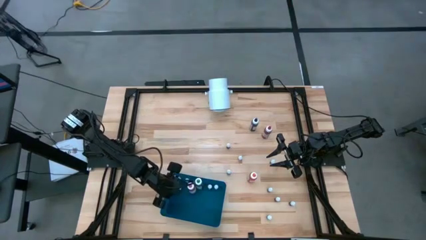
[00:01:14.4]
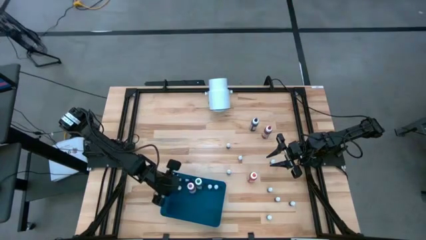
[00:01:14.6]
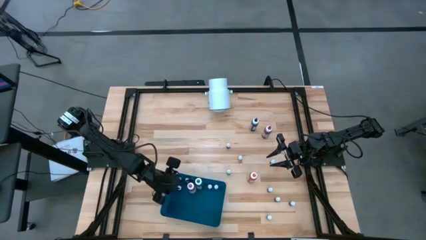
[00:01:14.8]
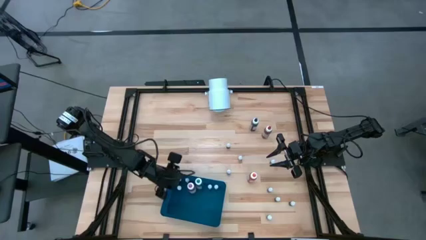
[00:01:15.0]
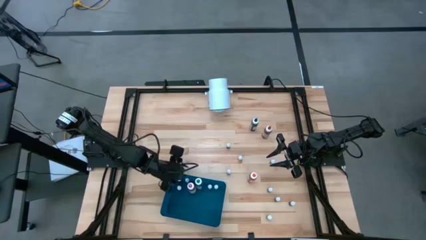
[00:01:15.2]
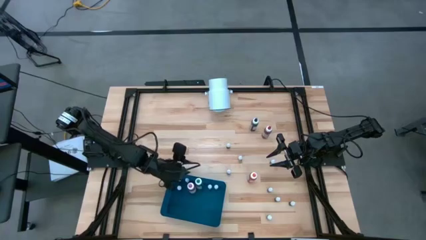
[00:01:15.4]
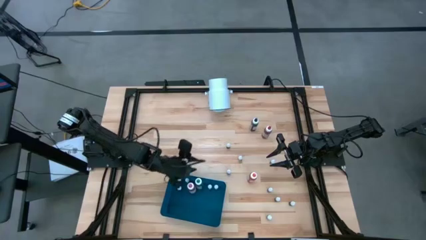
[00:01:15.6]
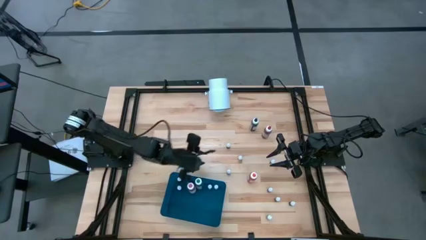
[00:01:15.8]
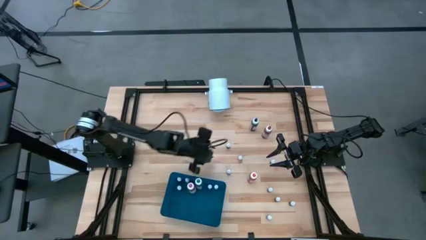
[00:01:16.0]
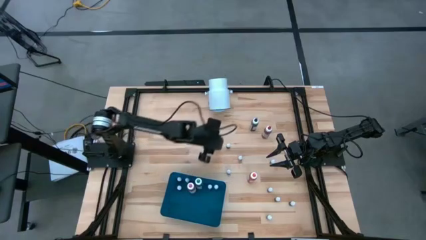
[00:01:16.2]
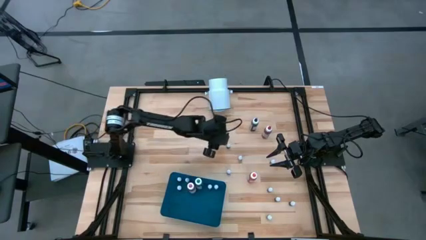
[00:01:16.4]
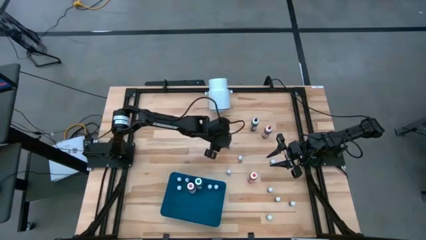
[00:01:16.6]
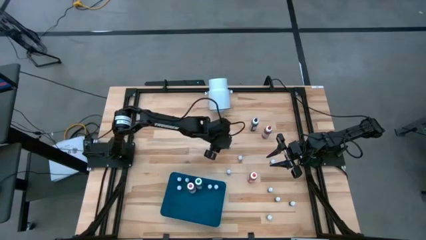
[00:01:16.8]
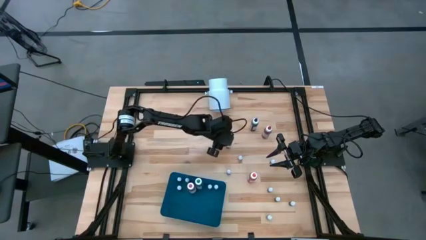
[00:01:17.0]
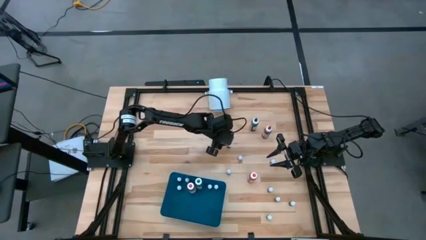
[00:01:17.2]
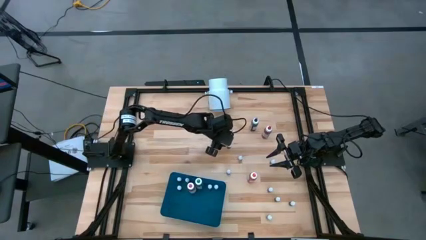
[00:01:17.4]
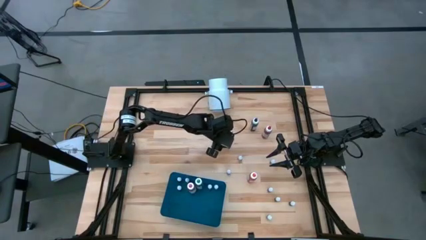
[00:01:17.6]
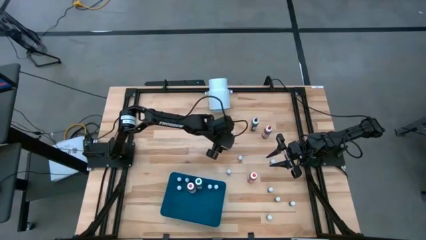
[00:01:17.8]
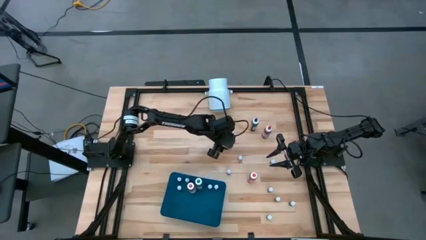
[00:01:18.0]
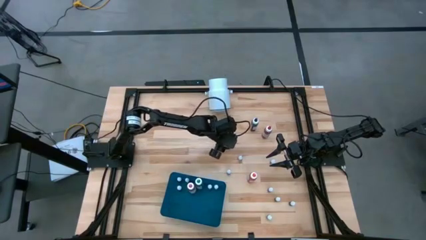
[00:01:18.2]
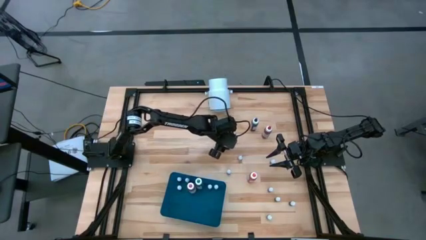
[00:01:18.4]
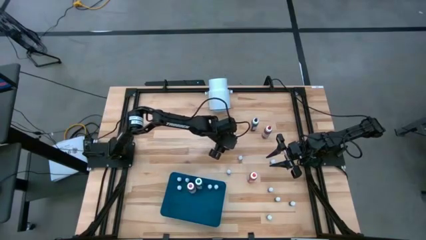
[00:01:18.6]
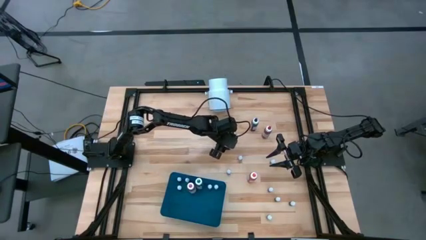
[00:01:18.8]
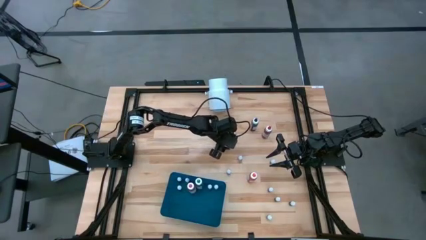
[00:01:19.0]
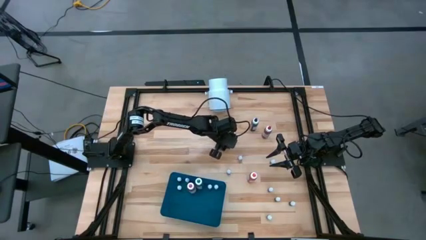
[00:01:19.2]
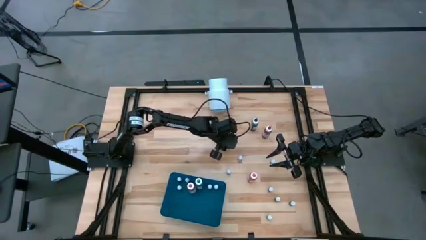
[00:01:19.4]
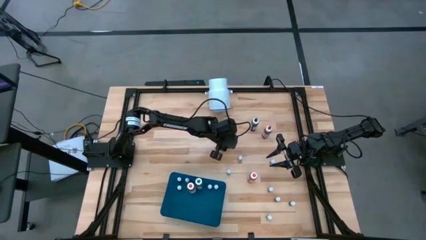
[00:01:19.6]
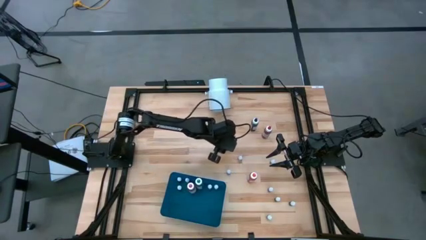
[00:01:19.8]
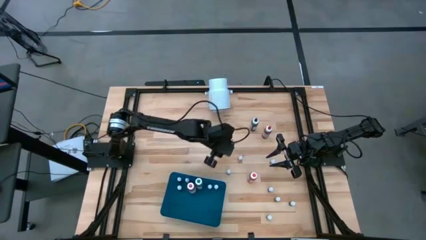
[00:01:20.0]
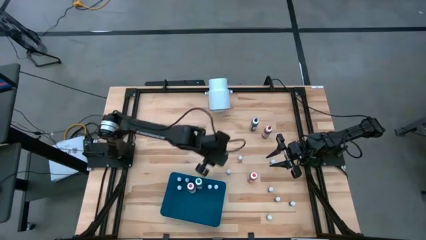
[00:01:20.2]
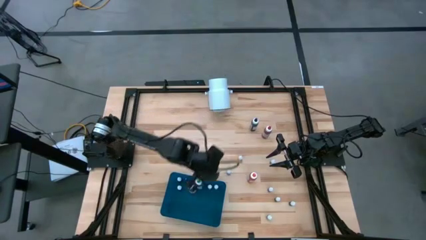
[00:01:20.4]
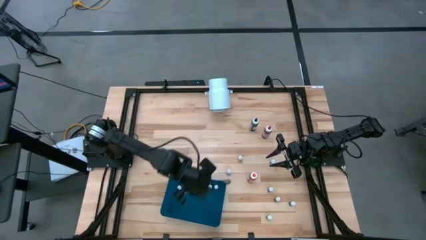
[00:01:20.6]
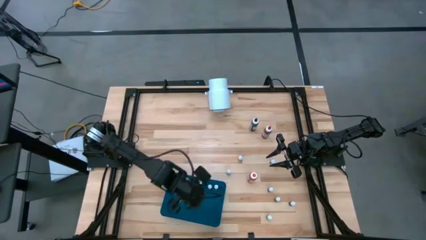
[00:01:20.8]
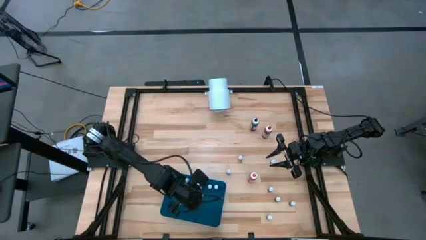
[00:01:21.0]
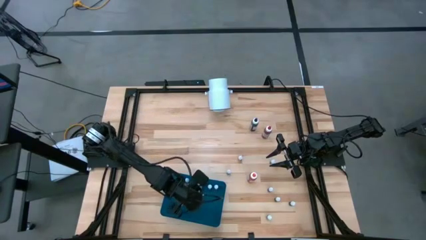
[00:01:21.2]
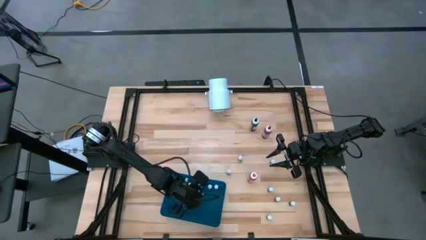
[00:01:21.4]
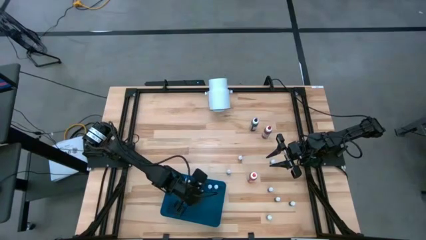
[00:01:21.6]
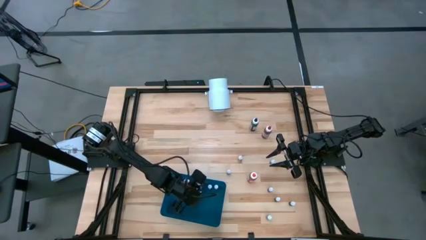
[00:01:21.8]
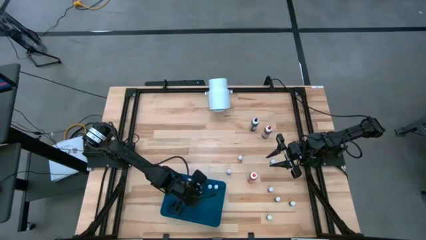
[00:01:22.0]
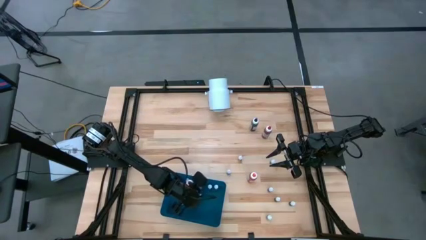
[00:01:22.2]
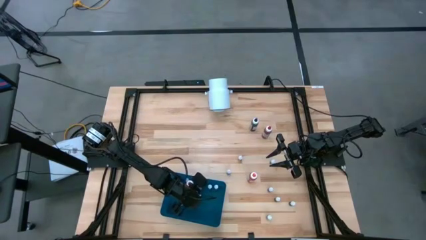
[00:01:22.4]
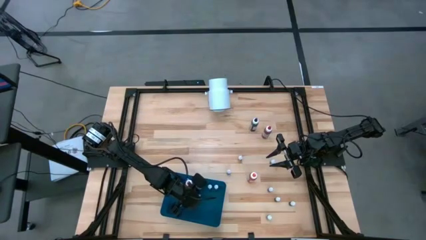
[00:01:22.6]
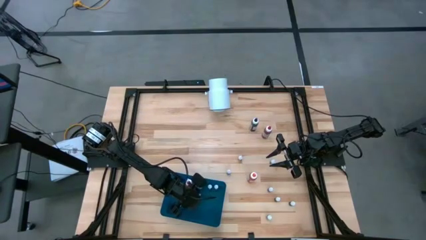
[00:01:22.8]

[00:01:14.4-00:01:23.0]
Task: Pick & Place food coloring
Put the small black food coloring bottle into the blue bin
